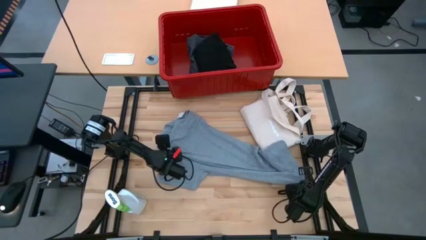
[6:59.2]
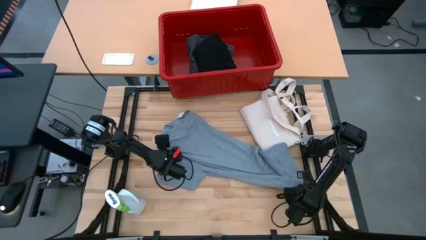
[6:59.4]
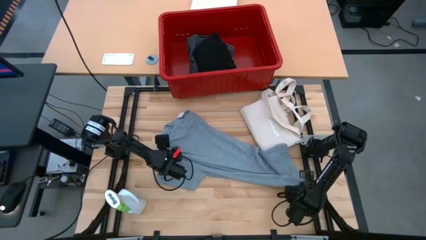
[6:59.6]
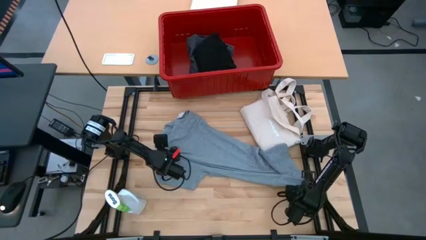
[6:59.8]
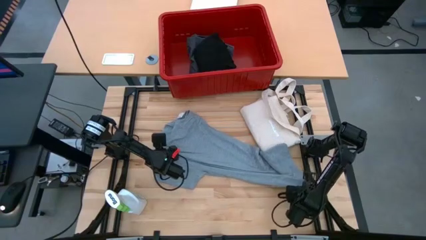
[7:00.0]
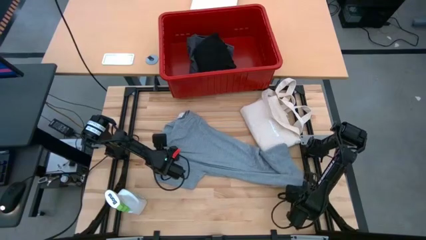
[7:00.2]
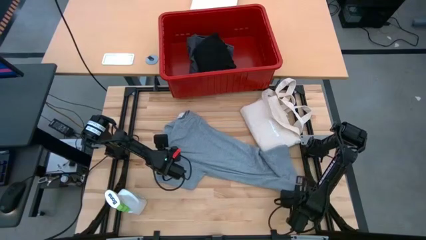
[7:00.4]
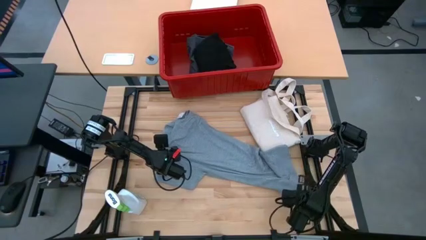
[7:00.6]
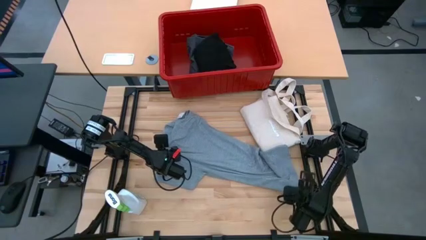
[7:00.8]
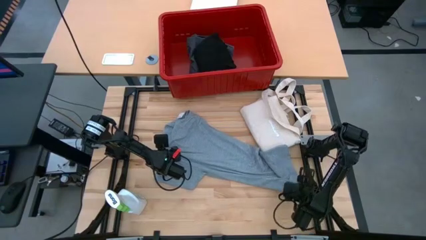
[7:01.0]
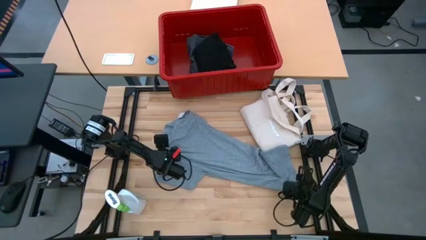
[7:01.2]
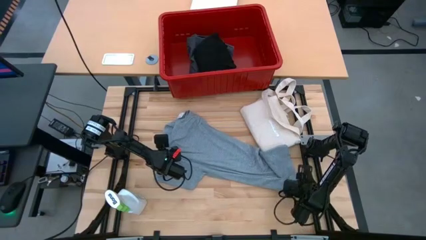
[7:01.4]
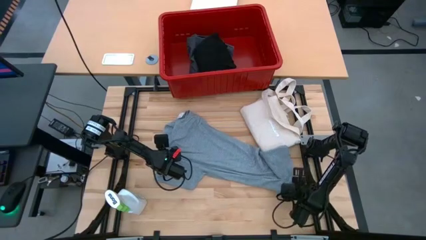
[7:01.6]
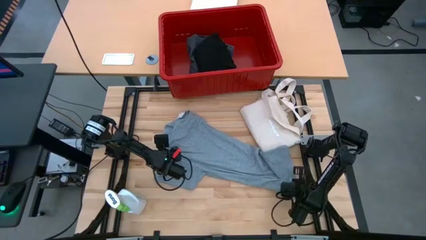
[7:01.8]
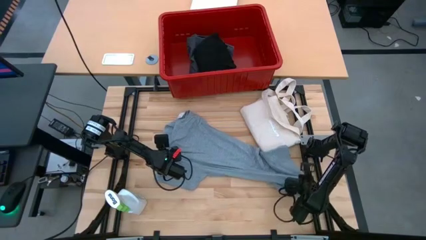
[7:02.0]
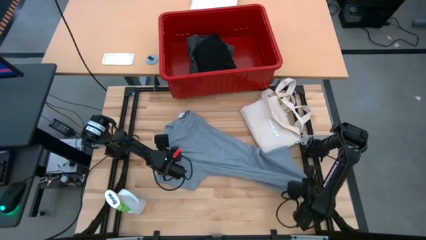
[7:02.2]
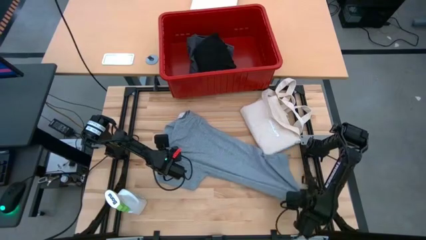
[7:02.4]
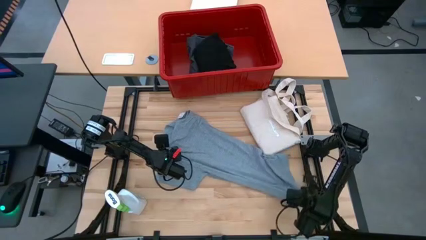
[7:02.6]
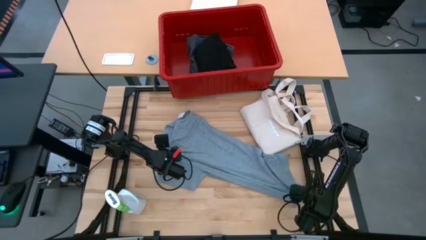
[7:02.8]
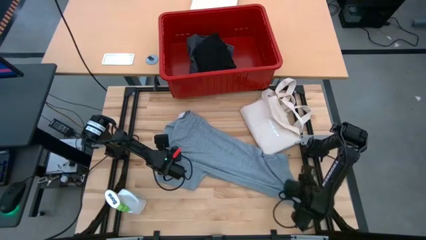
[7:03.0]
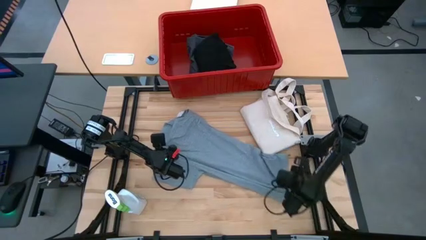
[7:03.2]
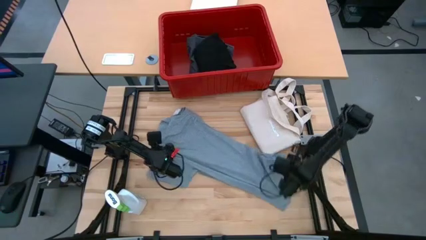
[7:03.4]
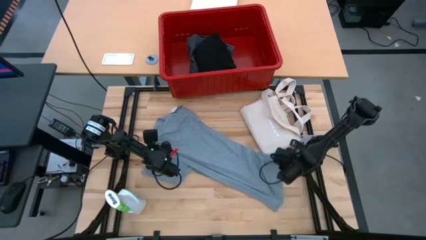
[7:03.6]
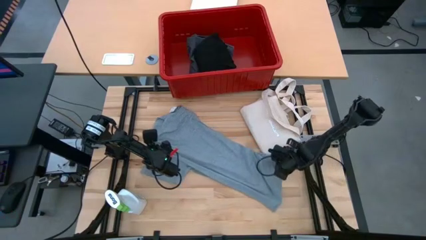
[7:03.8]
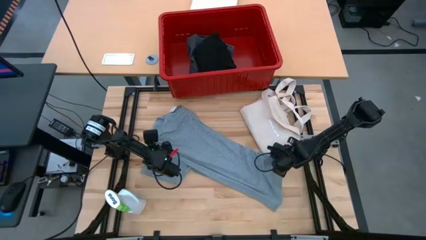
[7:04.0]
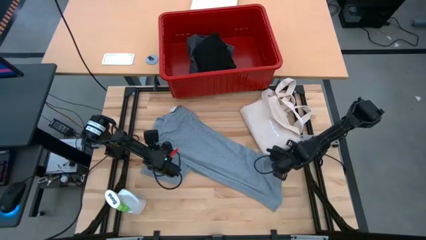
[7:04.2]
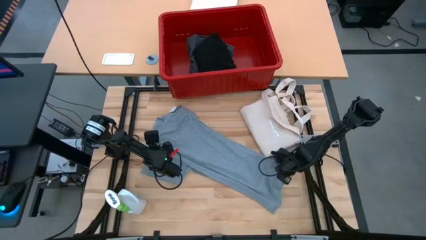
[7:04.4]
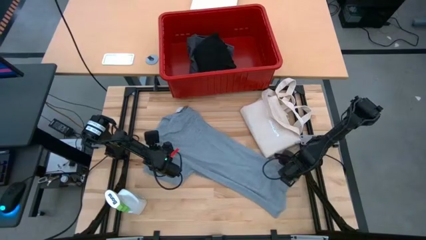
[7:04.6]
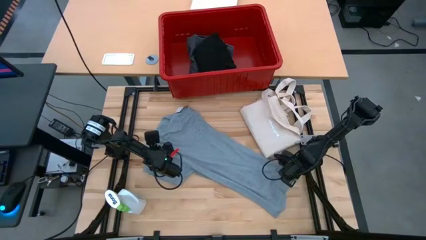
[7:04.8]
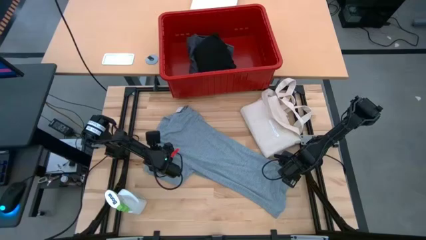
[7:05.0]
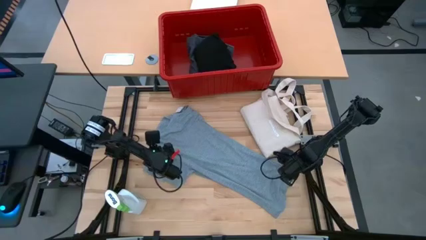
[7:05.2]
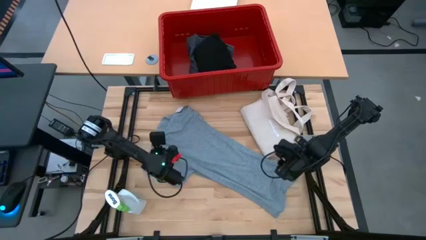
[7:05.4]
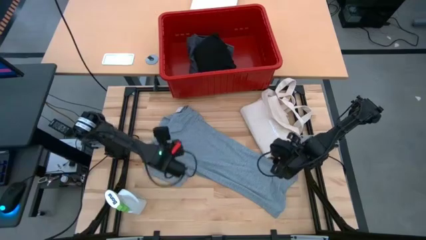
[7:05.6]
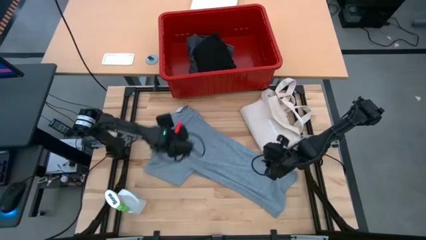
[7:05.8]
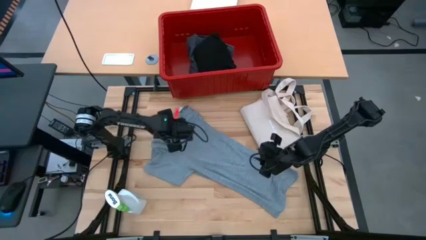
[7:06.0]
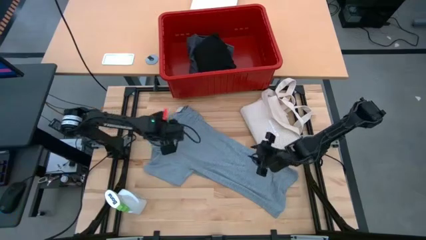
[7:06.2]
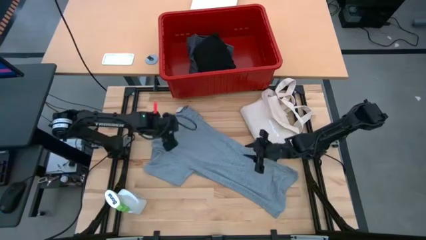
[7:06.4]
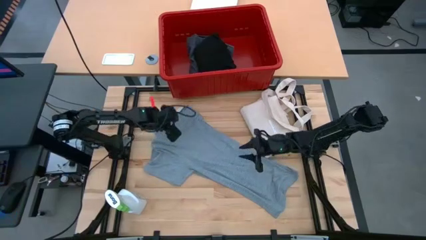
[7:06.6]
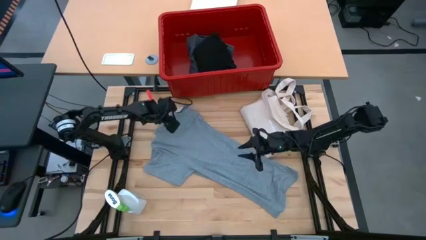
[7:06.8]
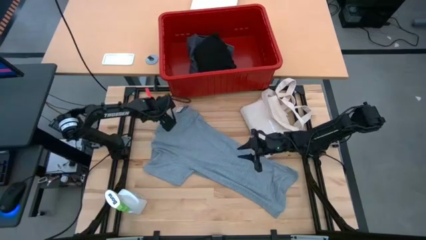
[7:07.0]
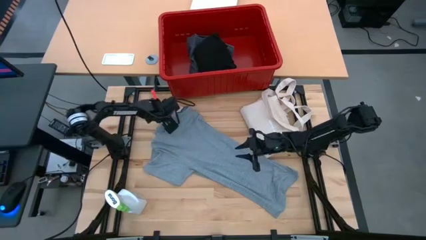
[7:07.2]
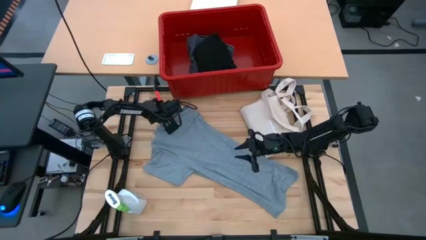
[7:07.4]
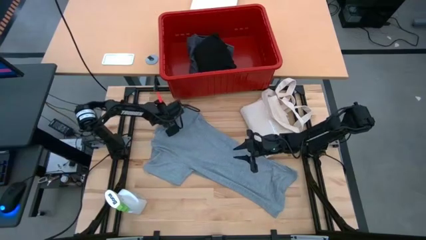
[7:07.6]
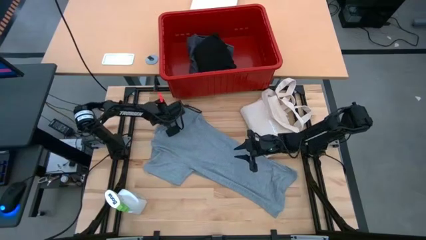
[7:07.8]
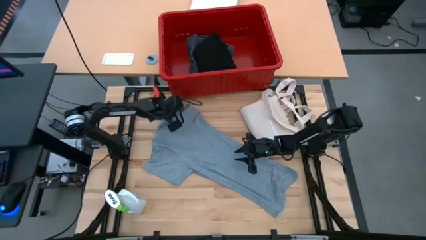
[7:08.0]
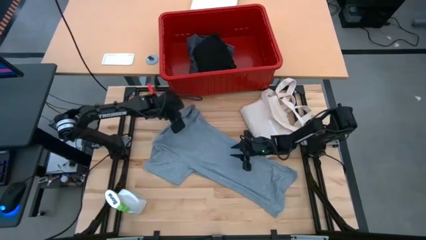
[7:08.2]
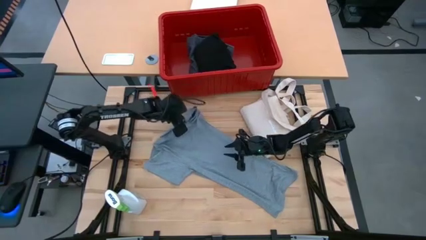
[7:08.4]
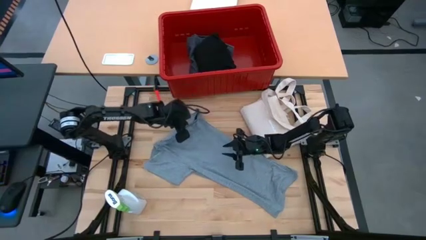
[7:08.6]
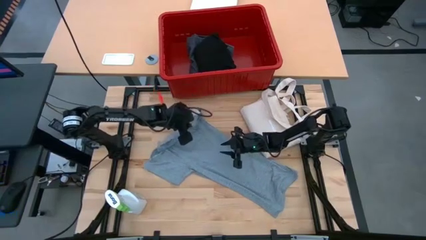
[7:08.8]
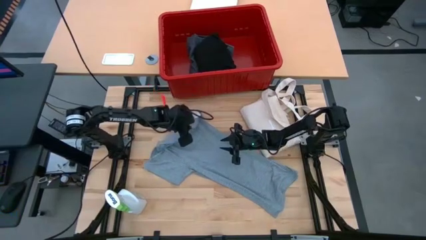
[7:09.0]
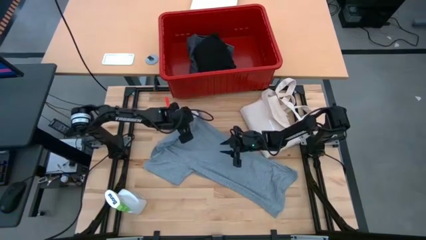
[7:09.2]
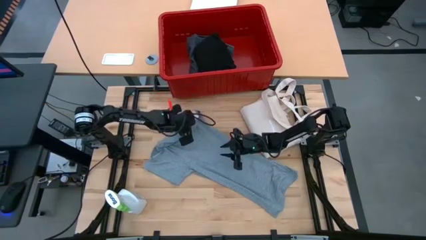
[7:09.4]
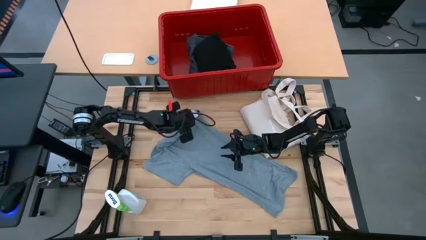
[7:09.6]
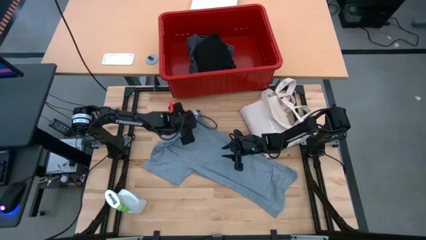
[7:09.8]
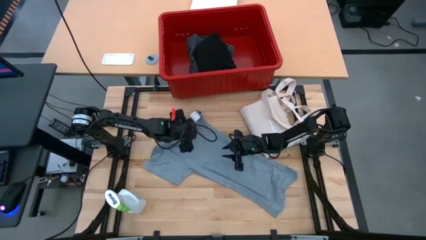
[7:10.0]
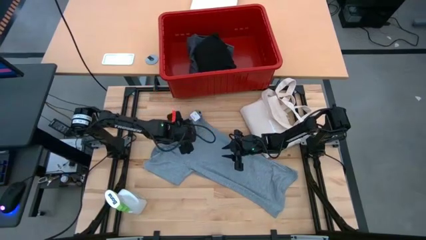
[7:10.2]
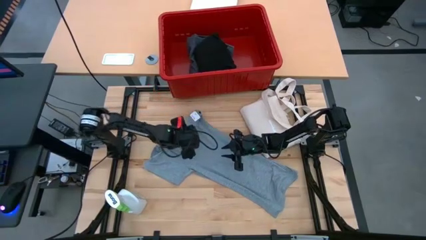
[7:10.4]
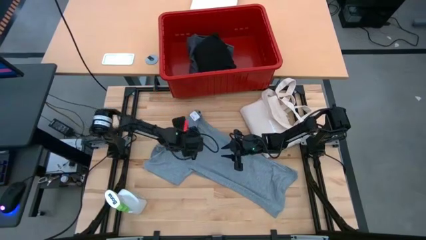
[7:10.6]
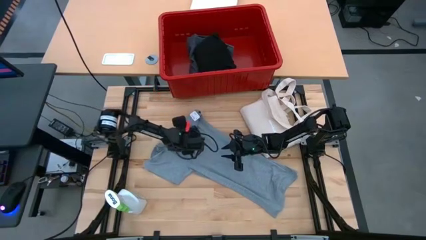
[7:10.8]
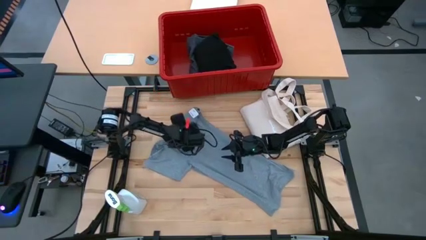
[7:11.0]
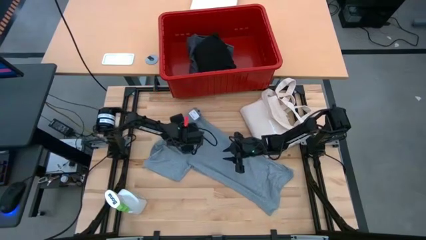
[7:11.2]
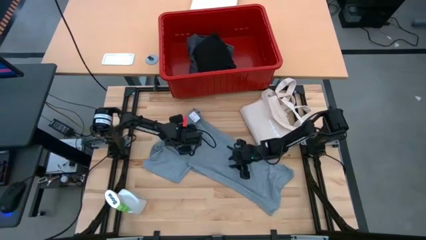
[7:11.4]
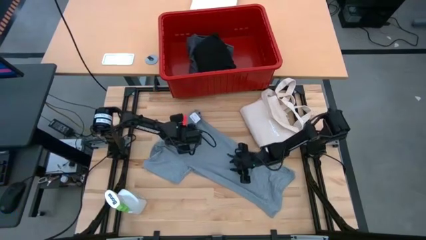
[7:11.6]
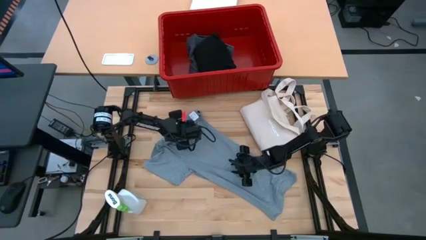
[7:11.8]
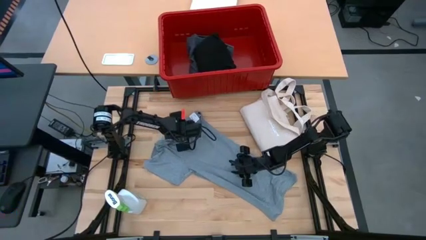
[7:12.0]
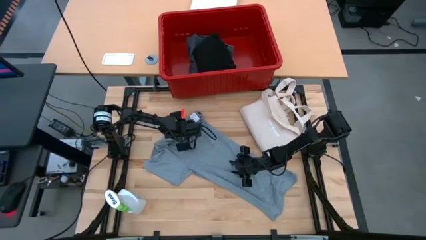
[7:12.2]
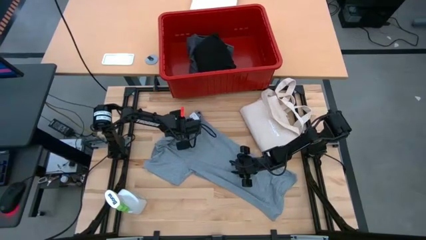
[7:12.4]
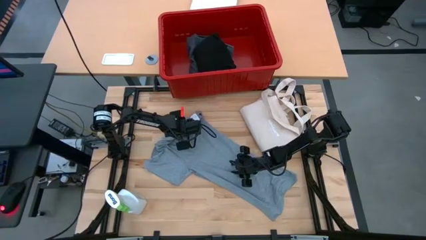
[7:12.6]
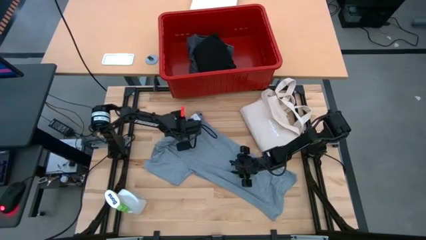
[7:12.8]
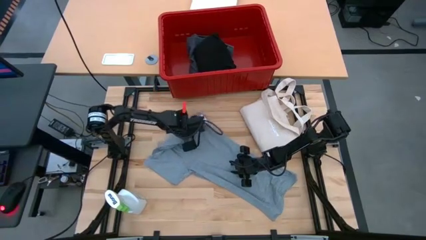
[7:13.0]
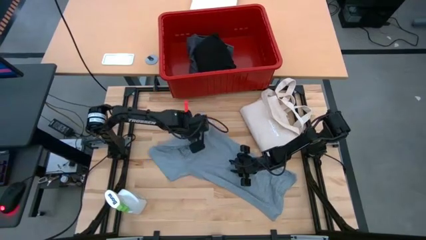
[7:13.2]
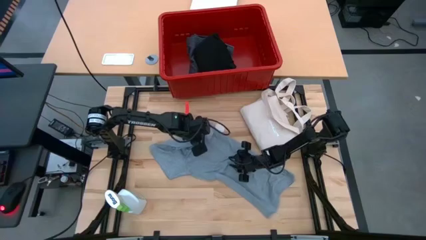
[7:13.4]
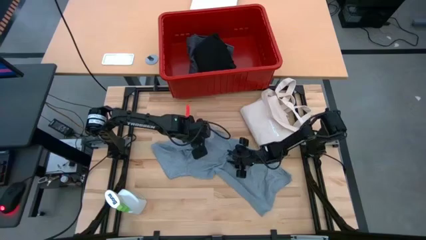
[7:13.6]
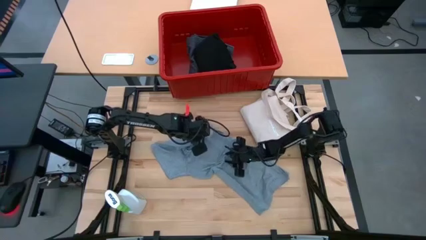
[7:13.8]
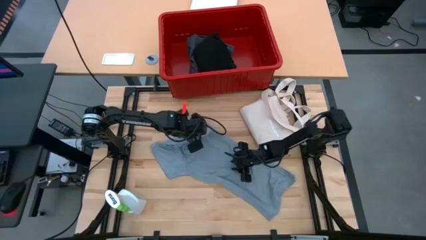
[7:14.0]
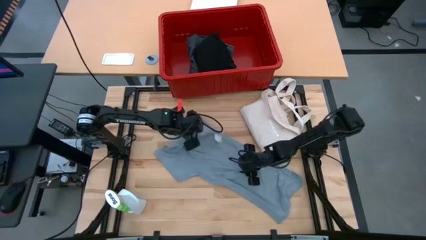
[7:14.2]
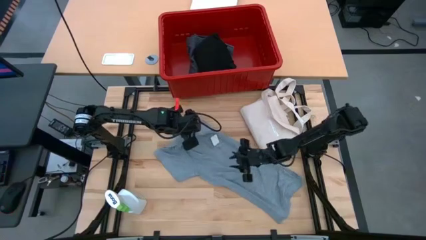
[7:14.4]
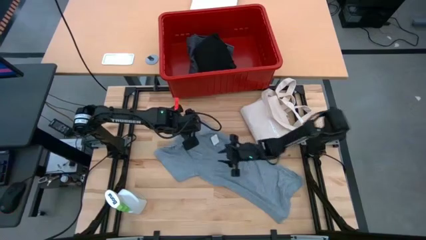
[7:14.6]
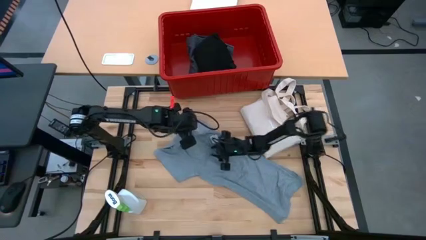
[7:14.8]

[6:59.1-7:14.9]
Task: Fold Laundry from Bin
Fold the gray shirt
